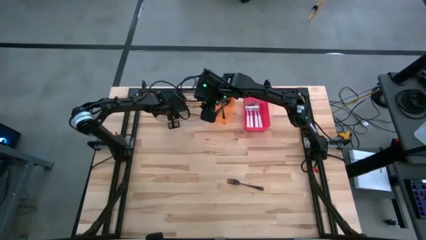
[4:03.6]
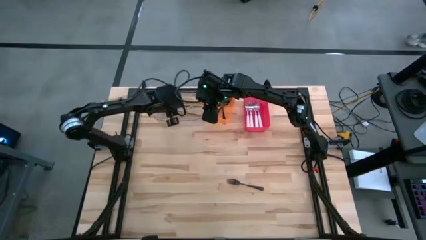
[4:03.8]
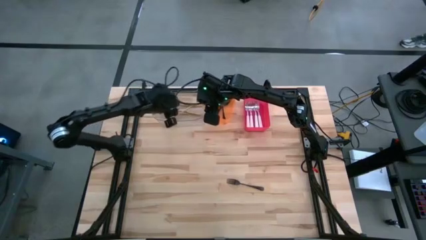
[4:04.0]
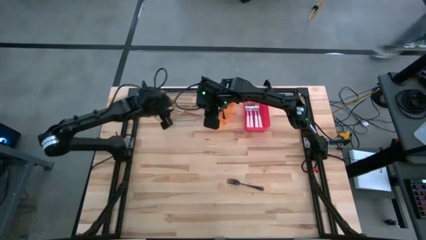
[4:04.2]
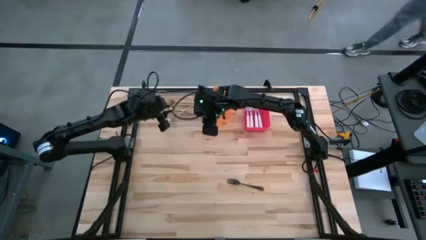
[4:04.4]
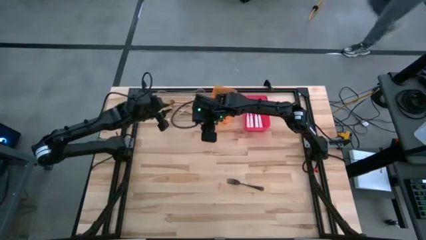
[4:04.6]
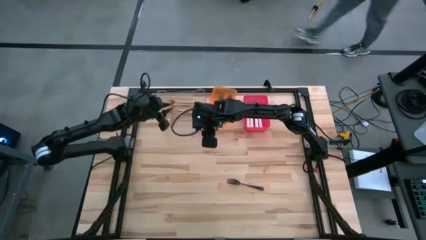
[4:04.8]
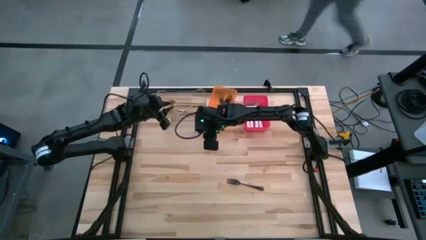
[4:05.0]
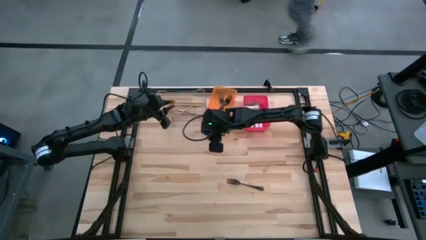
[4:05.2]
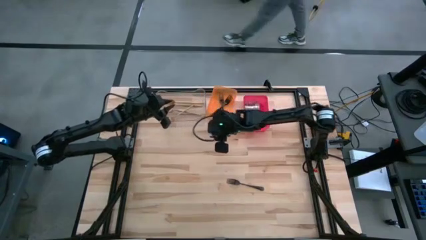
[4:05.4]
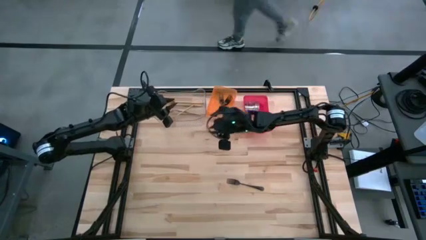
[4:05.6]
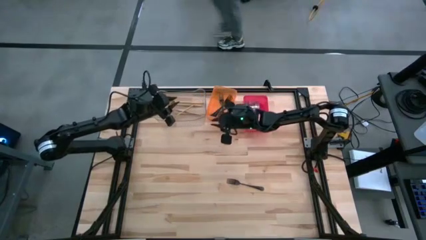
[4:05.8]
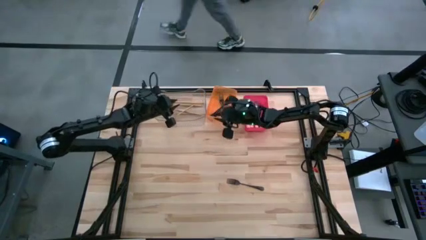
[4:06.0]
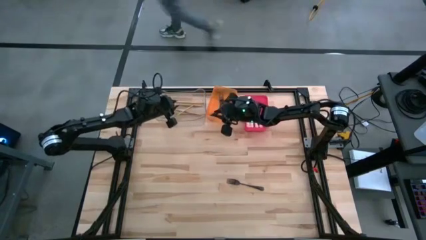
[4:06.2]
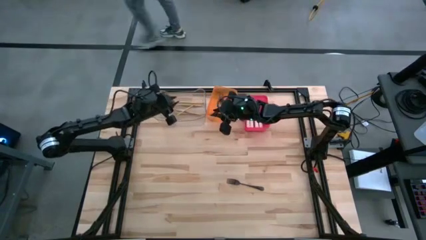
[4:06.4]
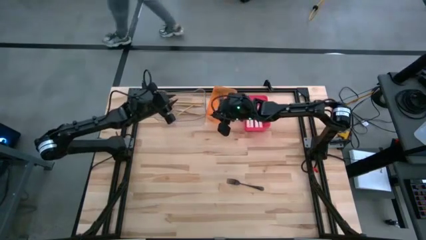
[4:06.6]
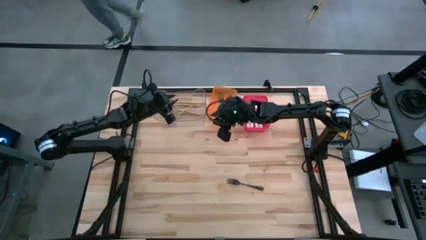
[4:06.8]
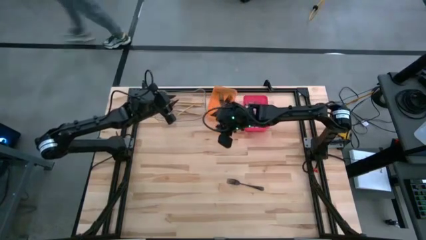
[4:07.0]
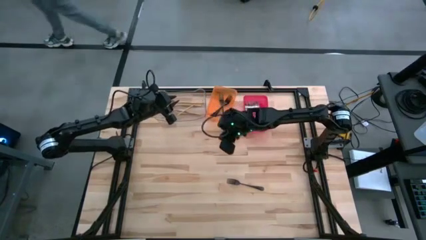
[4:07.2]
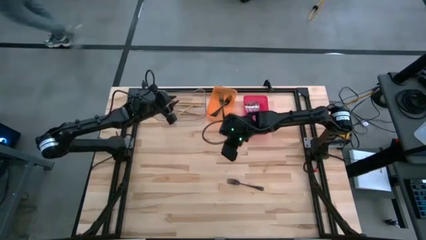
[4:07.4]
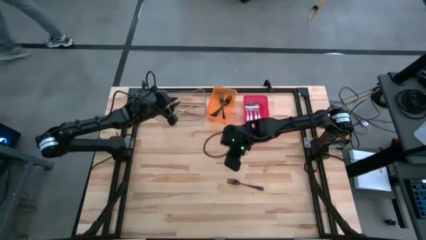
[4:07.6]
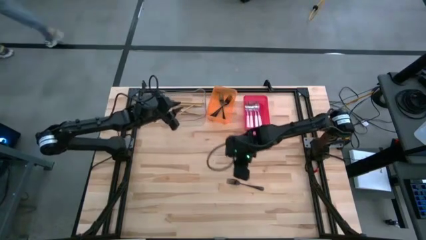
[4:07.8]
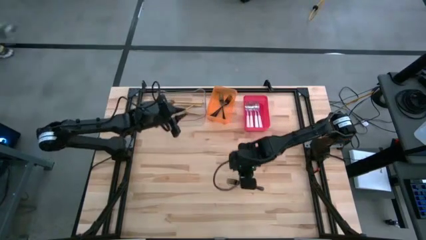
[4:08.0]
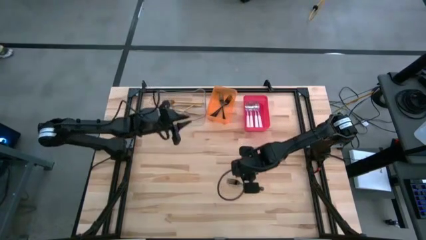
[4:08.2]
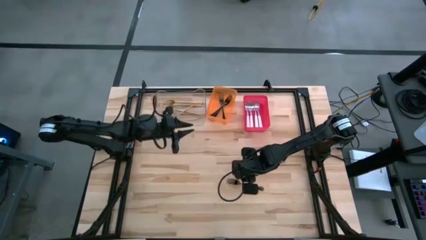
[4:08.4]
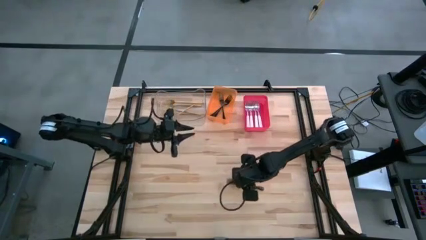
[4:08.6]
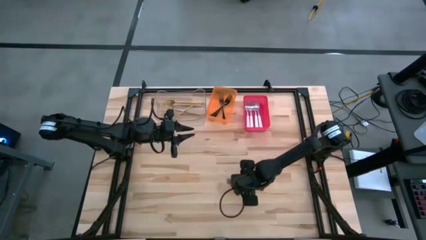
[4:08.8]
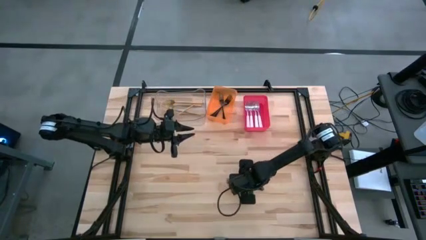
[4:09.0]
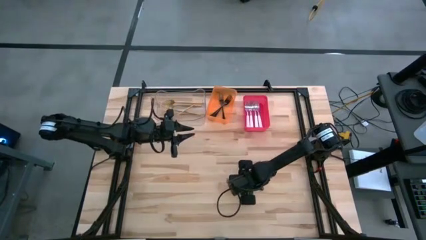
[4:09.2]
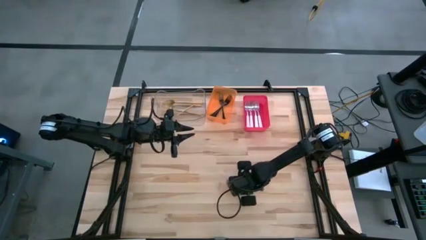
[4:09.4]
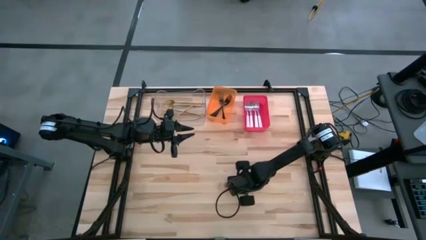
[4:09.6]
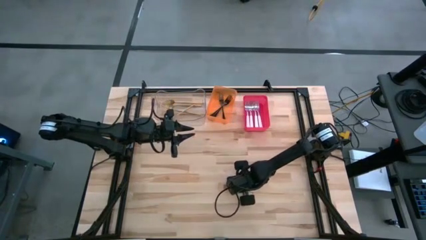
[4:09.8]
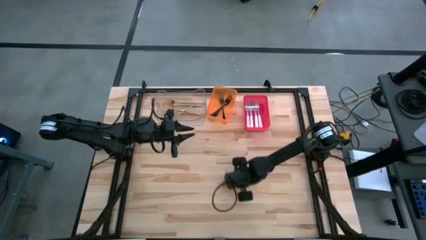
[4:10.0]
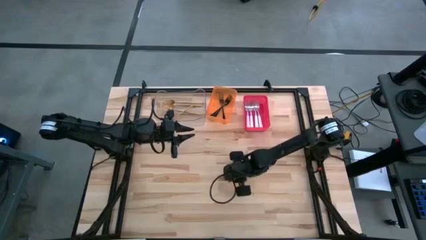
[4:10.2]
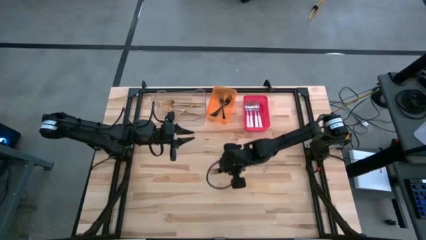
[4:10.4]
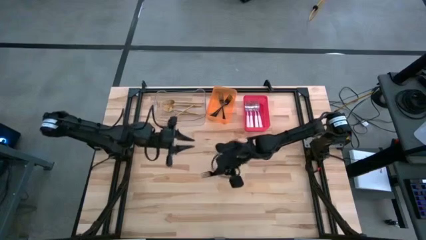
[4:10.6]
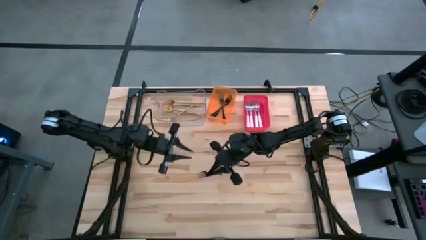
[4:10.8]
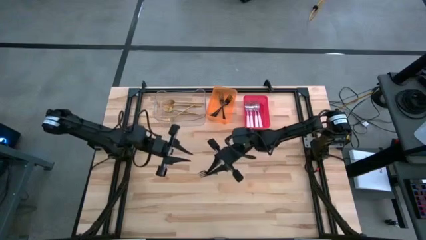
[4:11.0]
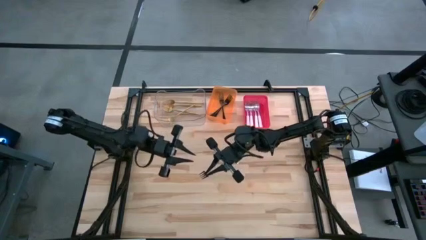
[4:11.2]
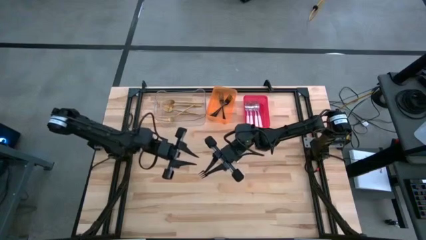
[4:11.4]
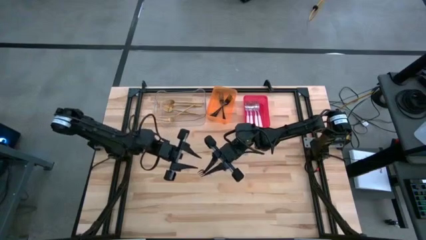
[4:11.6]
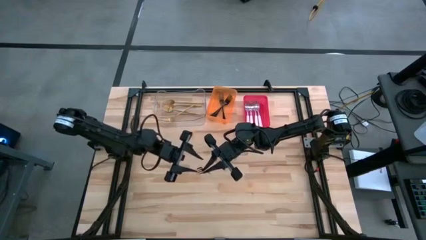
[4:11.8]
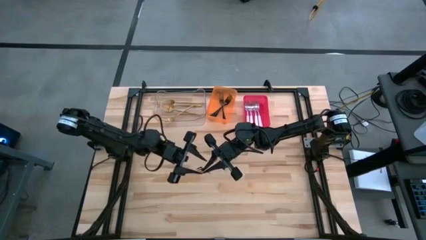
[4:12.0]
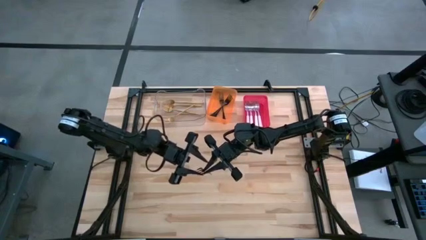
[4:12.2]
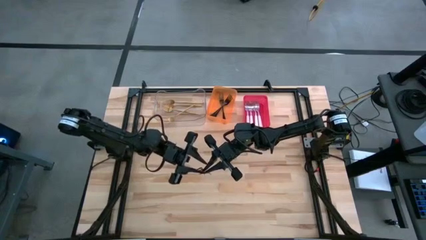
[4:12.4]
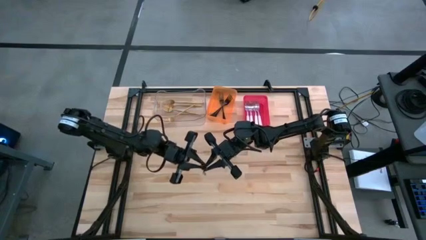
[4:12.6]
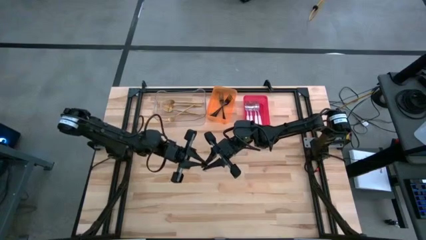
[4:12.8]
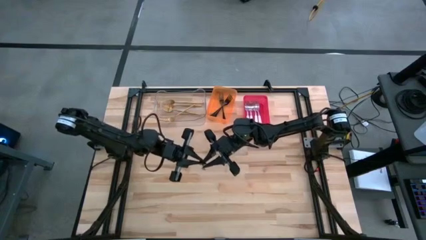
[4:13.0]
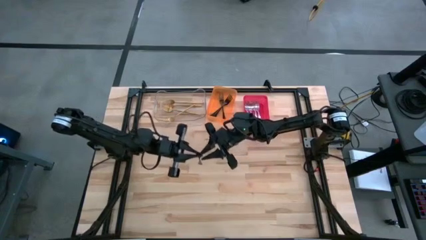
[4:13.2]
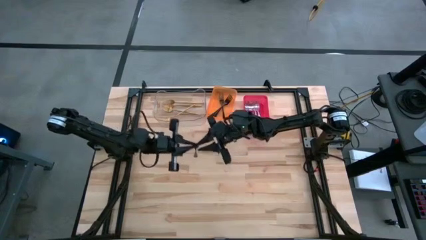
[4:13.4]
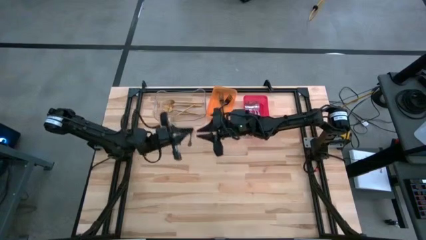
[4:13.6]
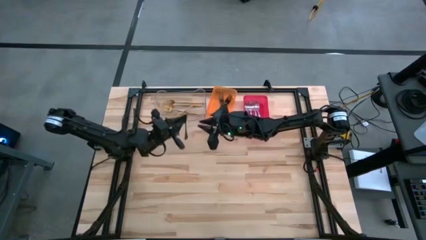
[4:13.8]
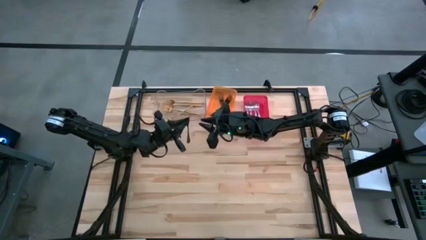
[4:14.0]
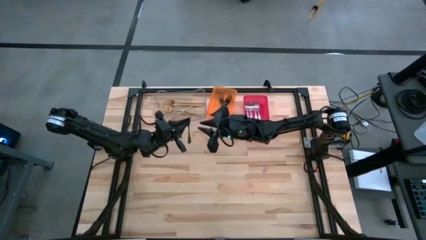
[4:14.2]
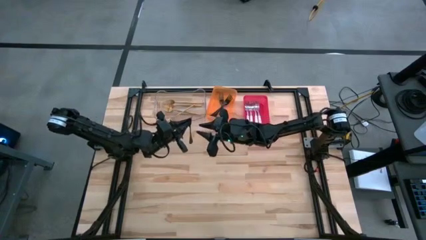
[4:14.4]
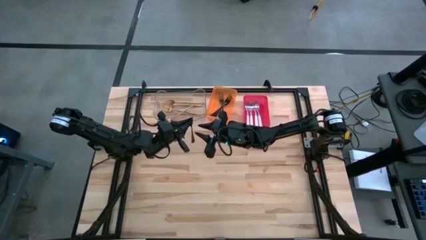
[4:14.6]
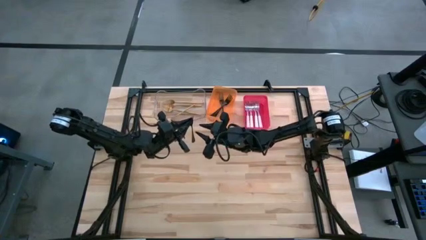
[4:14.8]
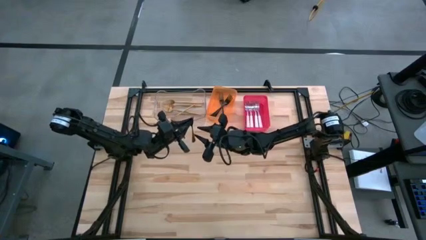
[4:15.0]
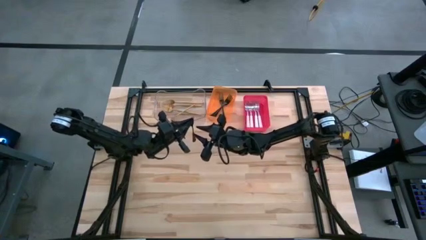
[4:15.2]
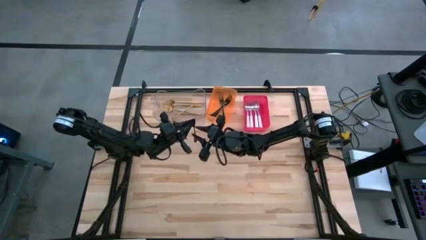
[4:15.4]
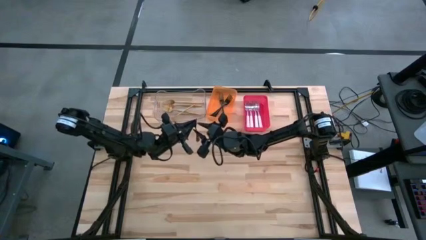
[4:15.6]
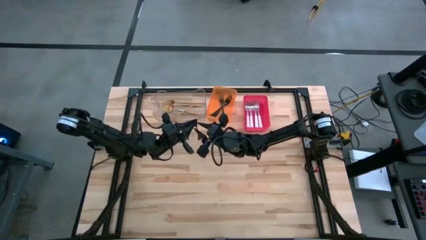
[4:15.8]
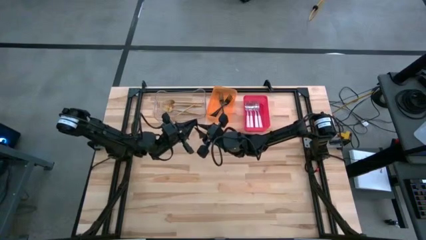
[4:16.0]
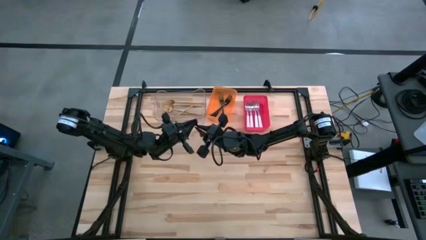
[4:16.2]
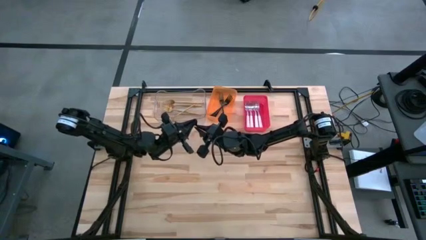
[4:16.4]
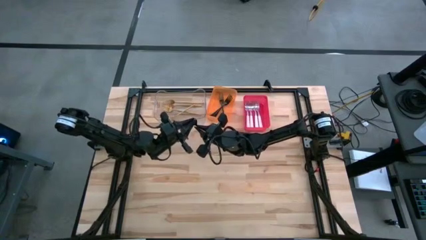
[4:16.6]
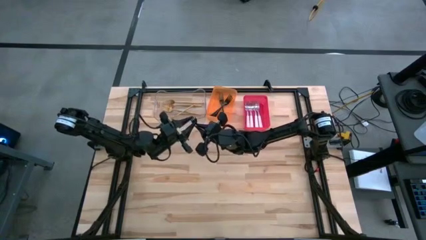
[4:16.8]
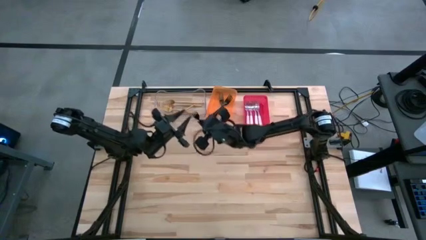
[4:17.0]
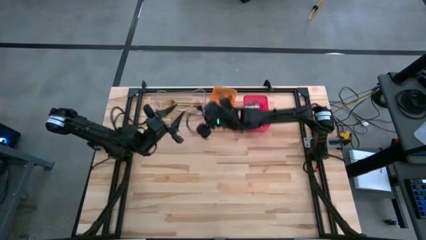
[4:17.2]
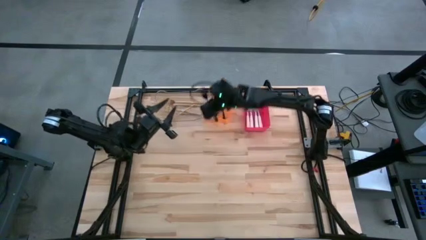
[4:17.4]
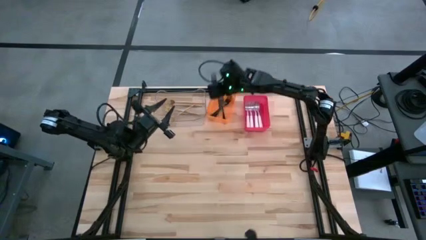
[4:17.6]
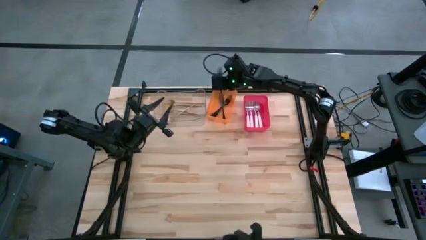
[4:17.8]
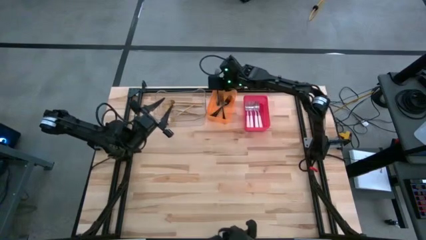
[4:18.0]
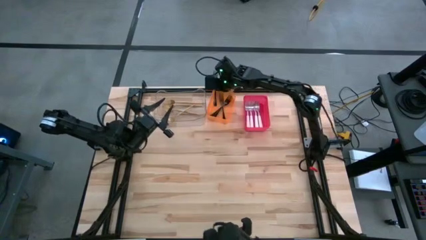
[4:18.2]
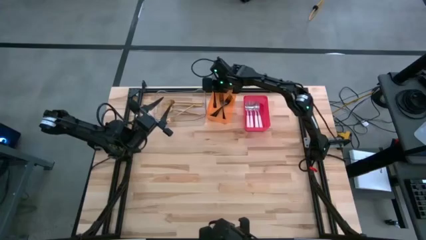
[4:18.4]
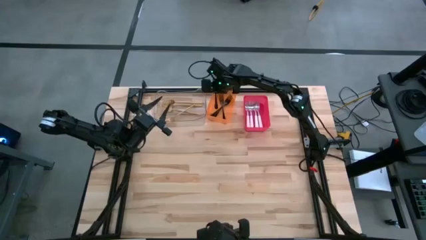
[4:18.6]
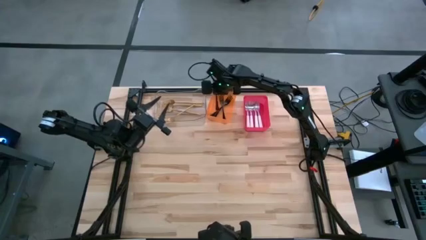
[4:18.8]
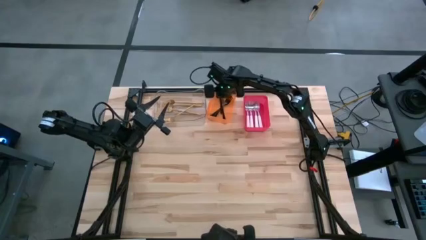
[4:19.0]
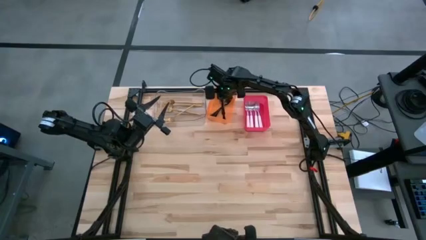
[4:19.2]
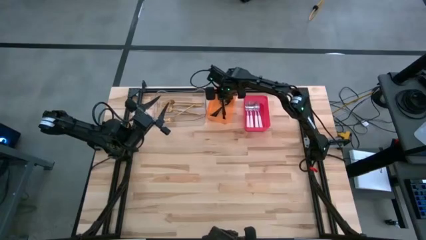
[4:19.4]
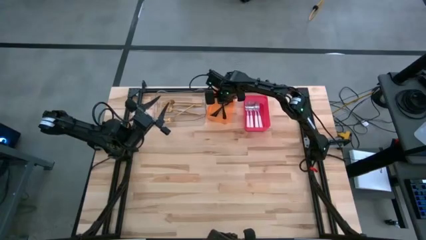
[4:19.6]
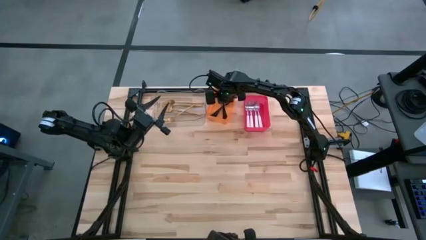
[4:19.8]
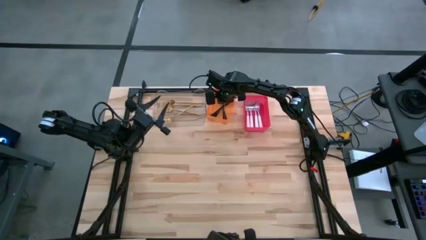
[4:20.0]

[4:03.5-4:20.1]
Task: Sort silverware by color (type)
Put the black fork into the orange bin
